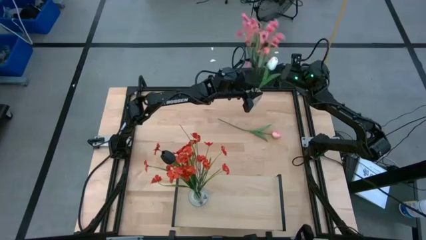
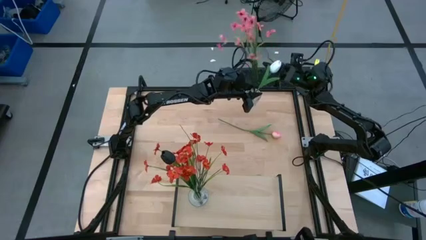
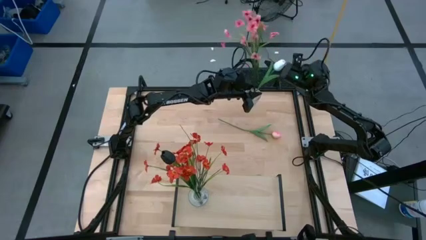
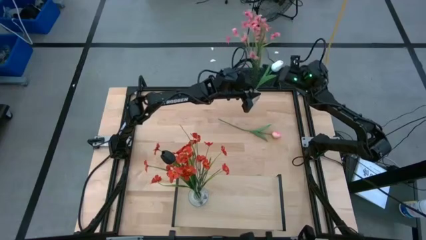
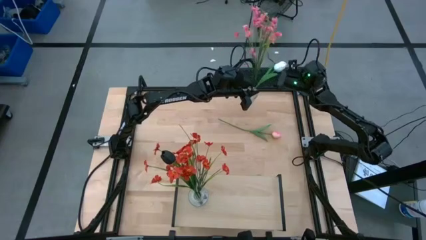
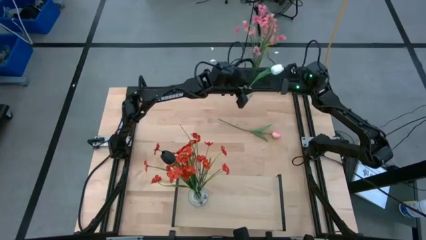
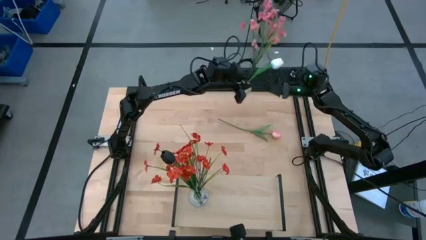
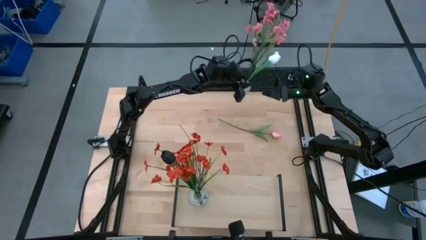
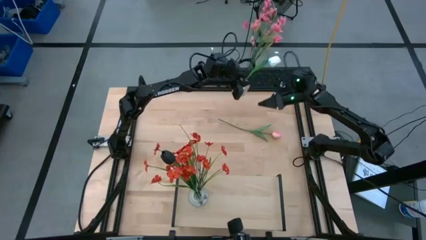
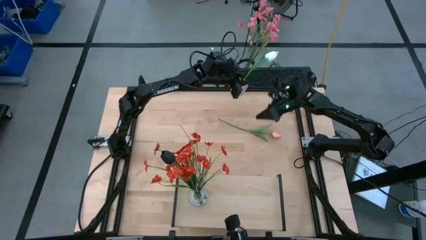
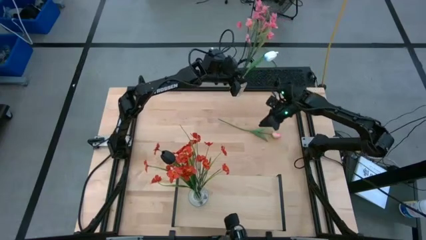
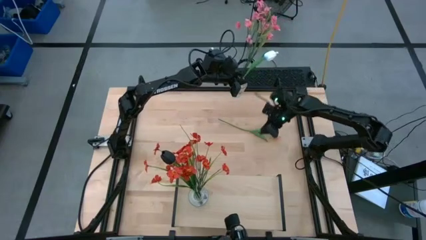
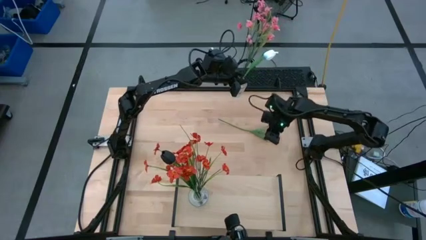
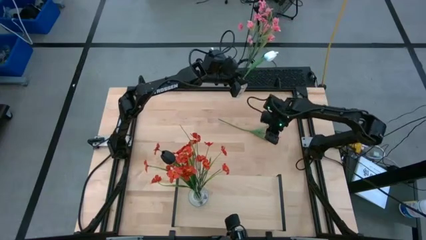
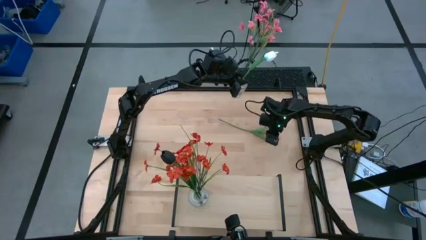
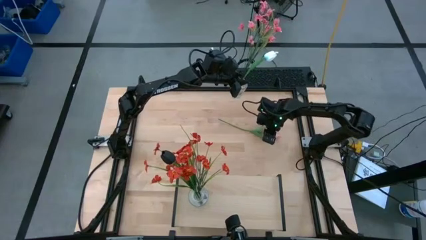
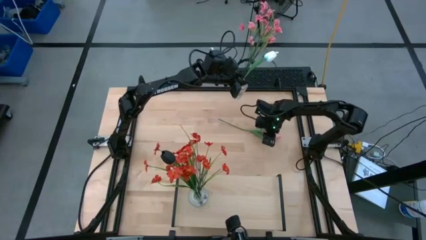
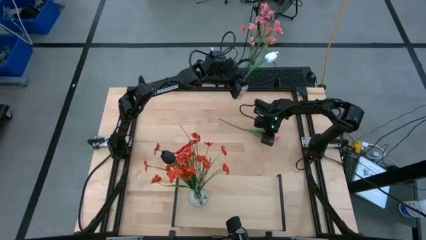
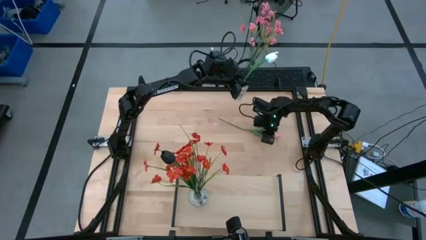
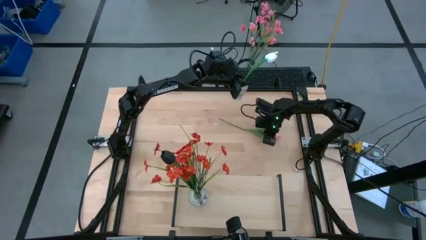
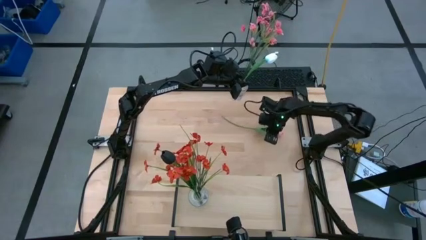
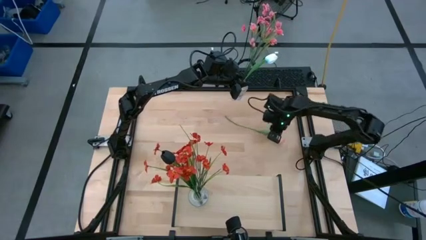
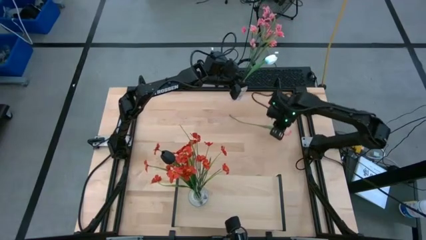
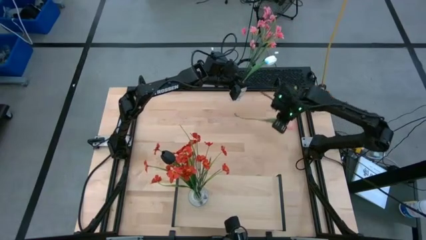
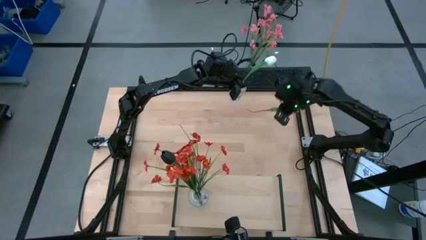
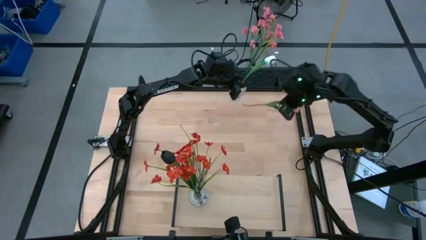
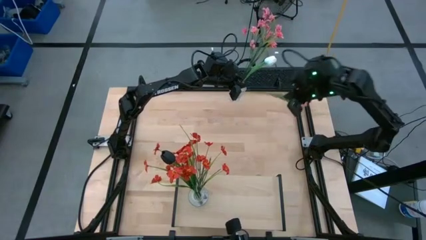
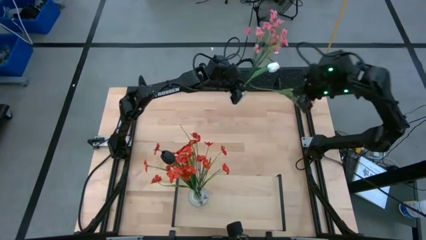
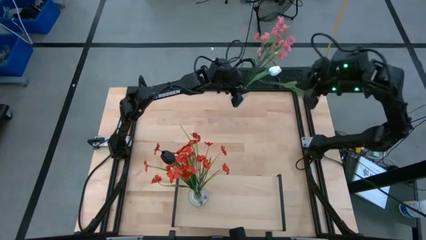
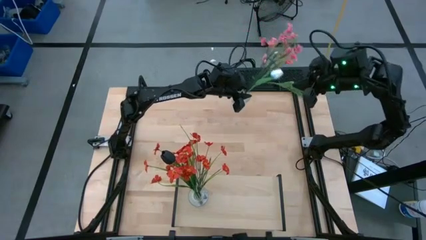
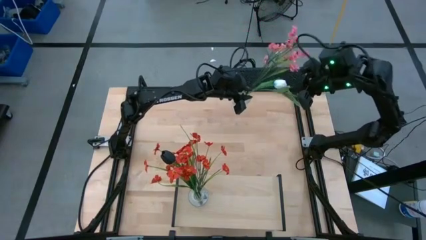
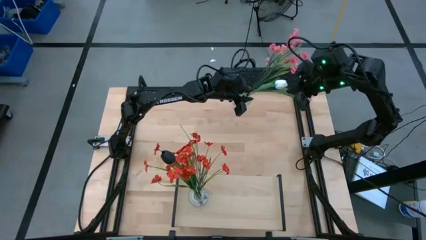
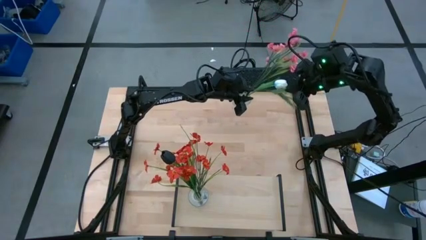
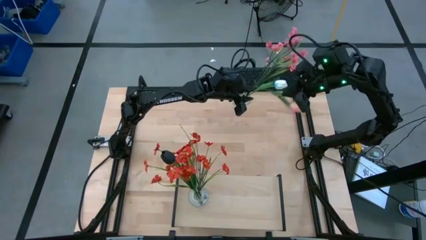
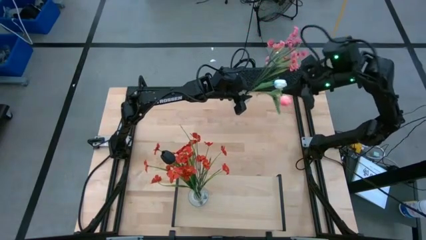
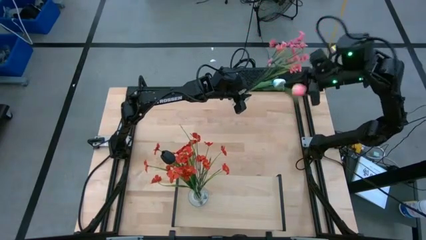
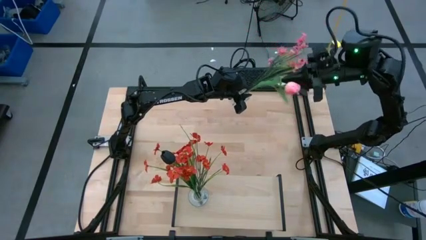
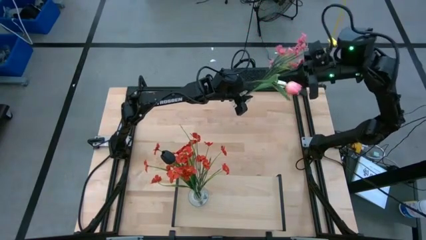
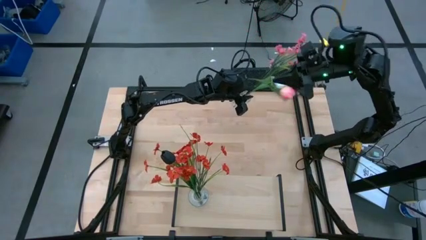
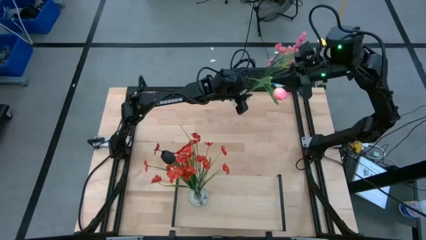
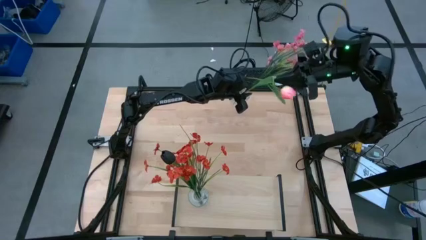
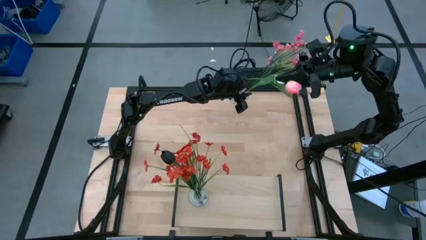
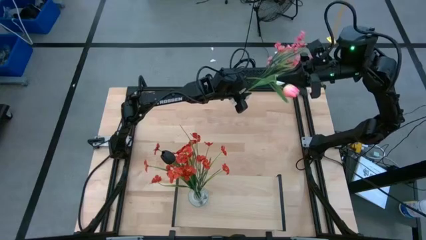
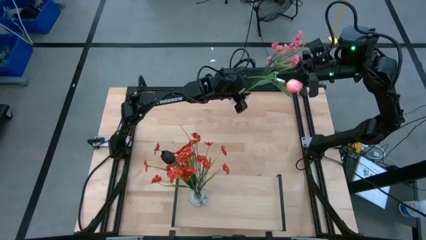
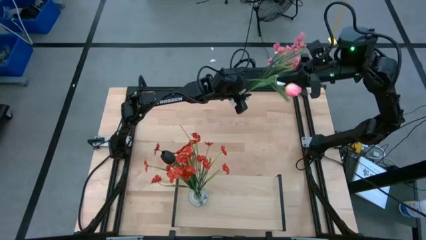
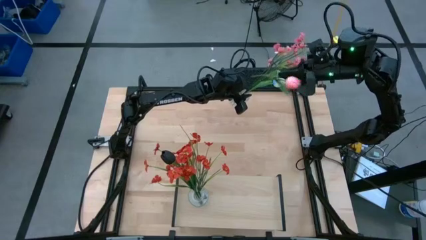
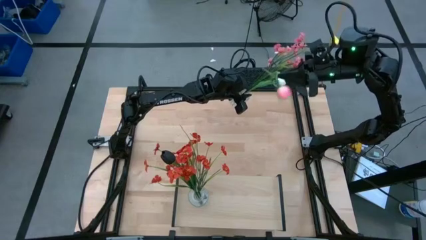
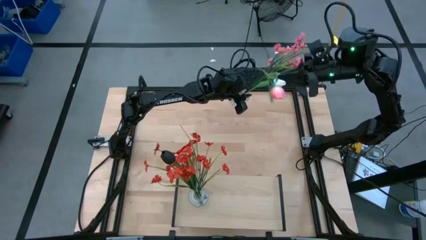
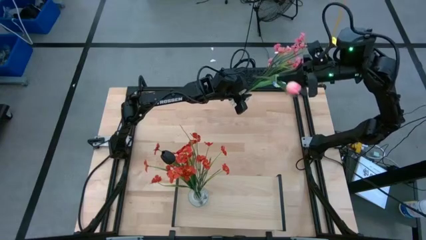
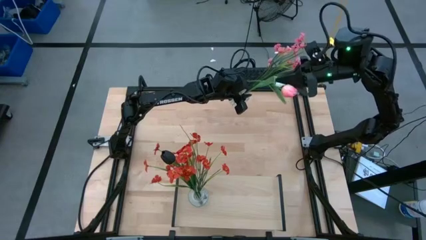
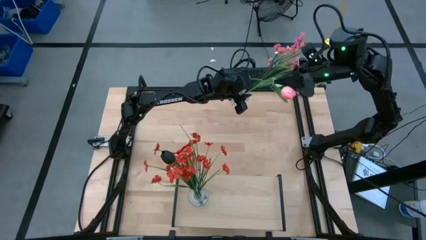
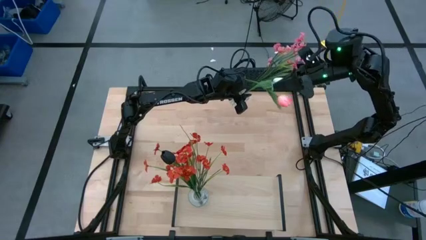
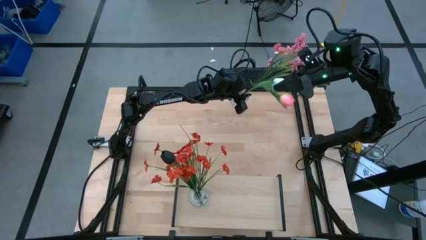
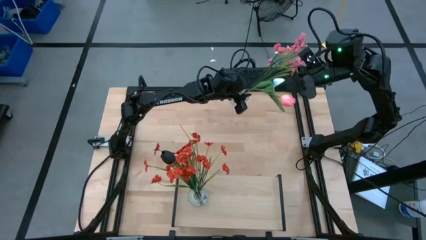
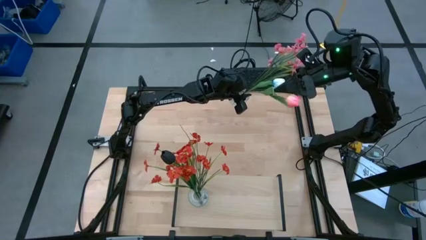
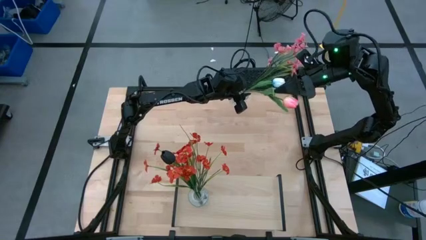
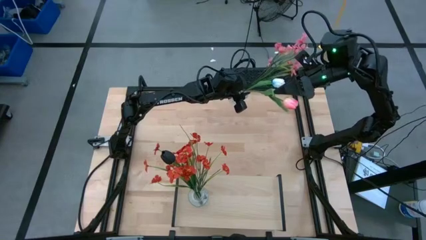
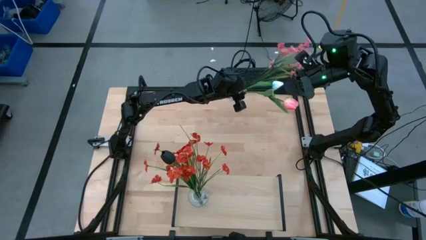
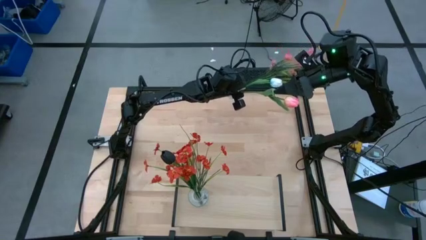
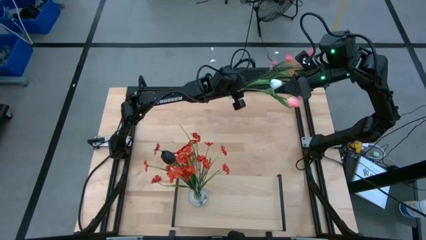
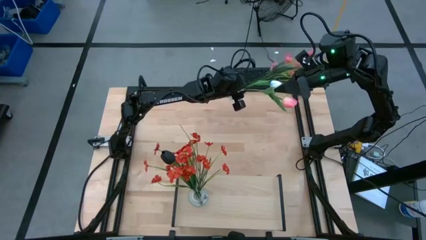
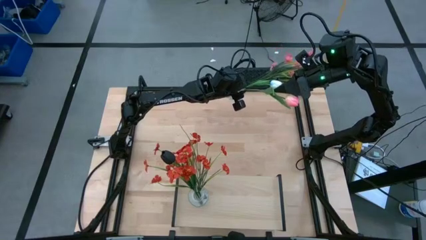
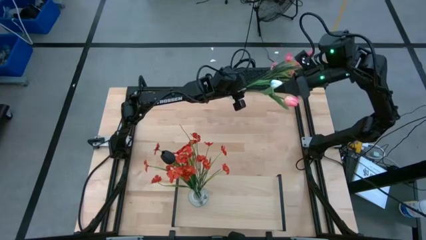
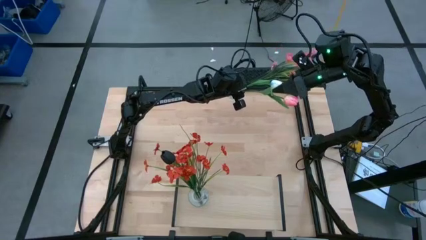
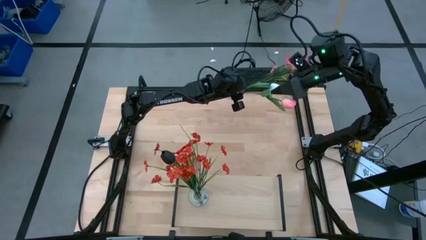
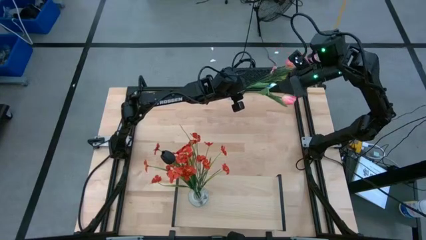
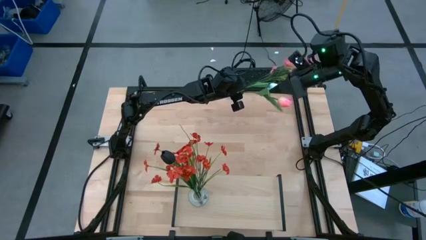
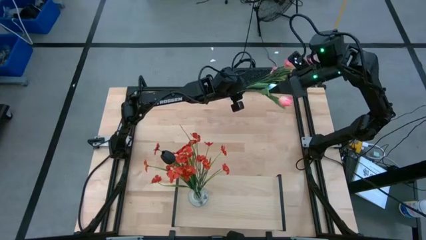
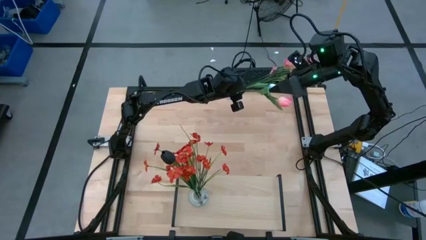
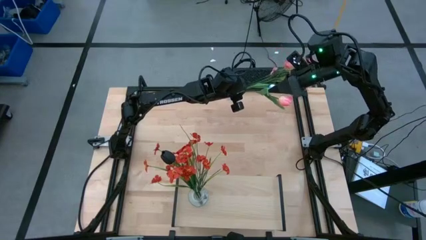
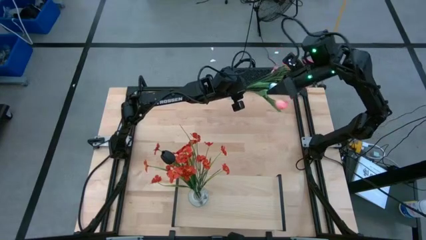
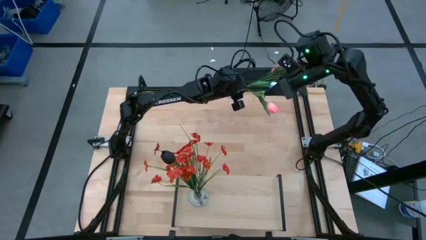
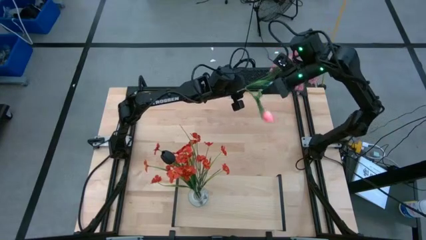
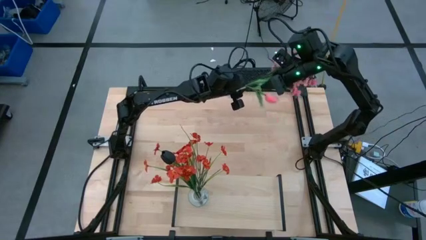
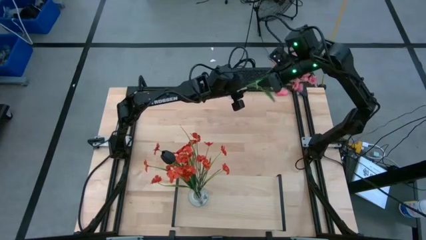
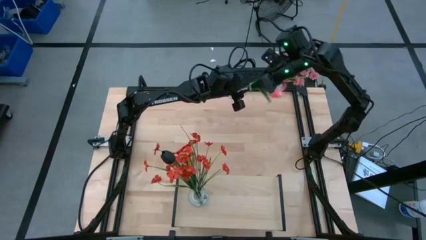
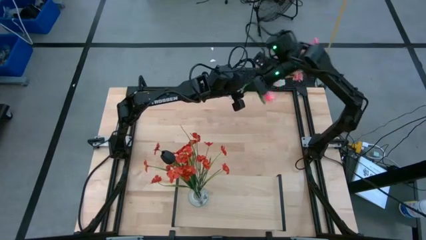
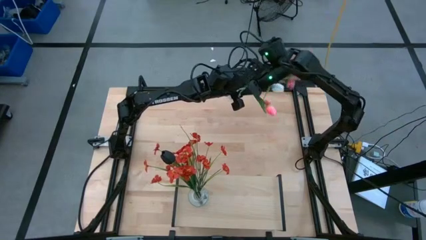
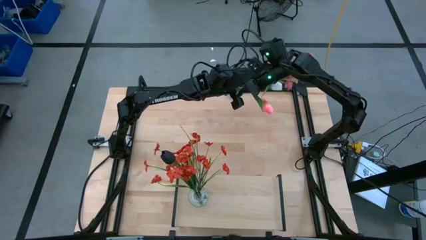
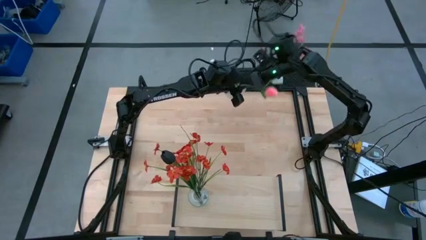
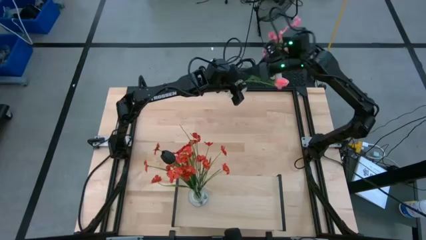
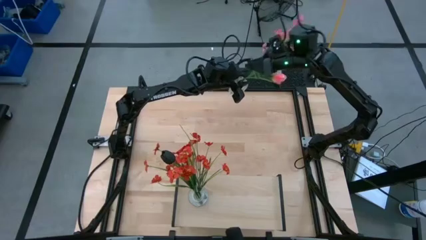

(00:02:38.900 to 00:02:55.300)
Task: Pick and place flowers into a vace then onto a shelf
Put the pink tulip into the transparent vase
